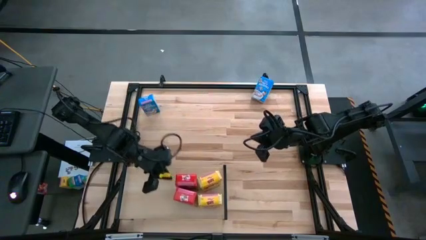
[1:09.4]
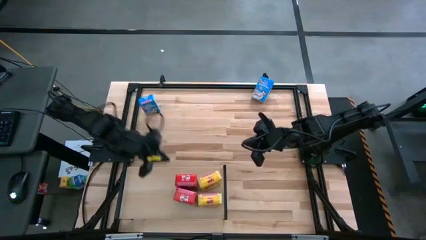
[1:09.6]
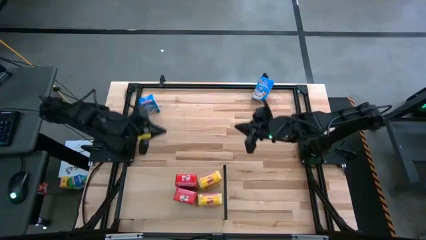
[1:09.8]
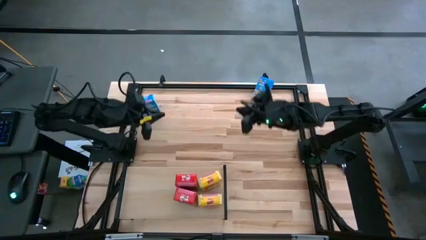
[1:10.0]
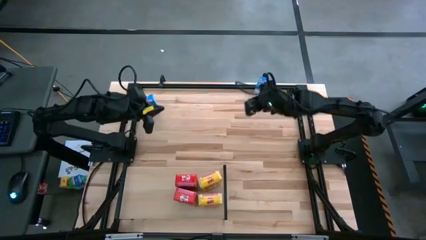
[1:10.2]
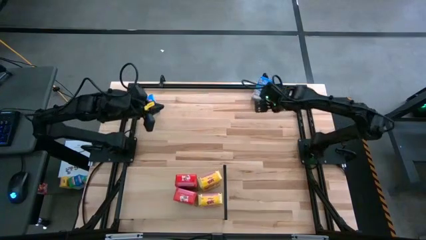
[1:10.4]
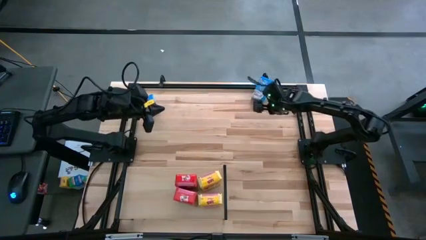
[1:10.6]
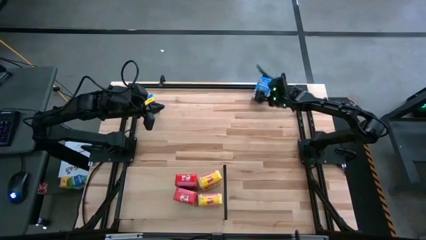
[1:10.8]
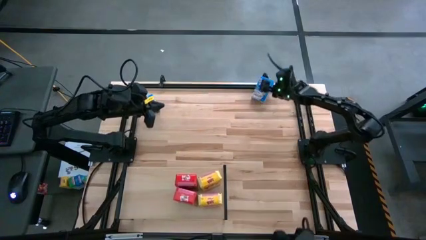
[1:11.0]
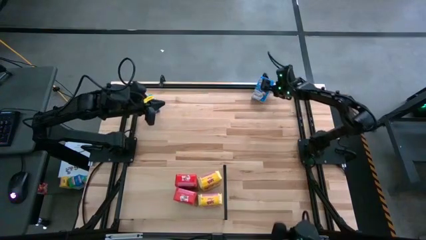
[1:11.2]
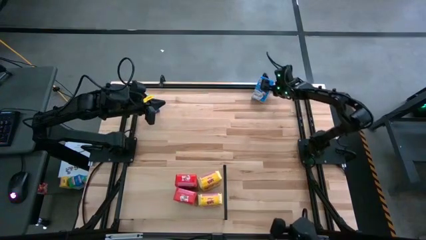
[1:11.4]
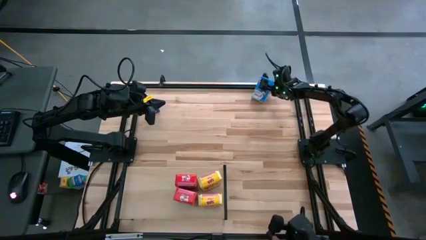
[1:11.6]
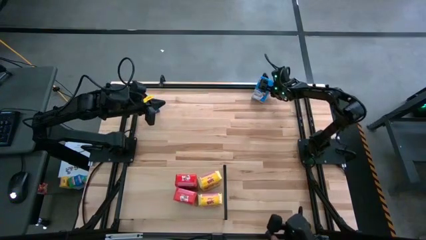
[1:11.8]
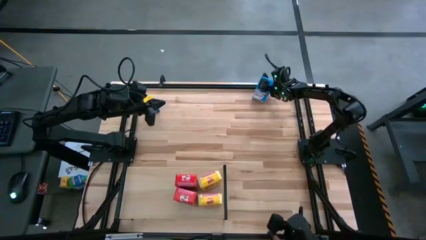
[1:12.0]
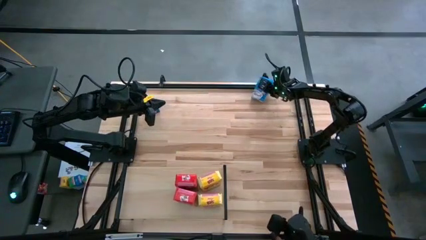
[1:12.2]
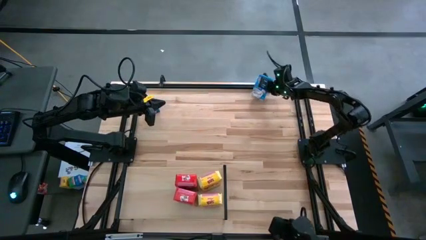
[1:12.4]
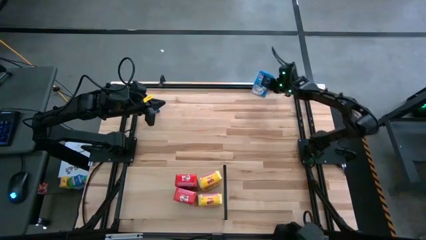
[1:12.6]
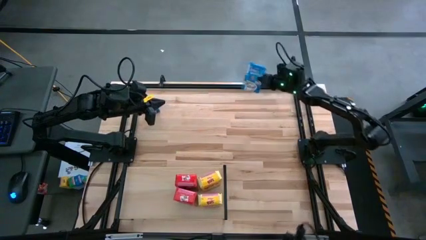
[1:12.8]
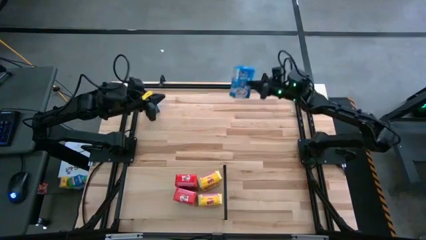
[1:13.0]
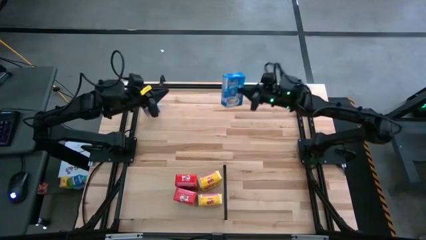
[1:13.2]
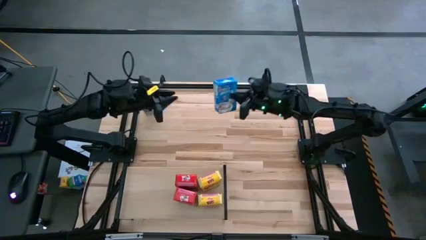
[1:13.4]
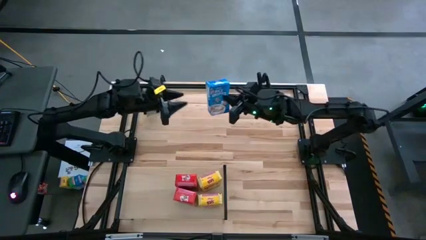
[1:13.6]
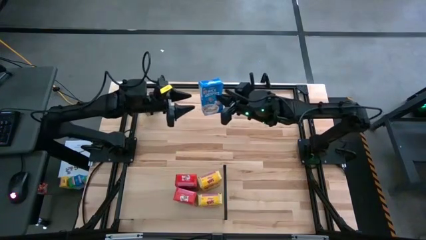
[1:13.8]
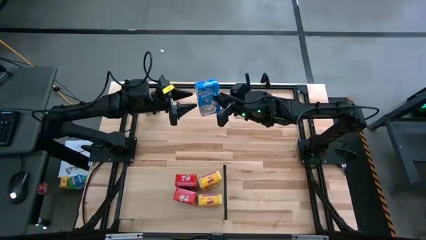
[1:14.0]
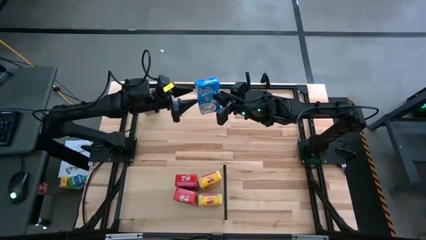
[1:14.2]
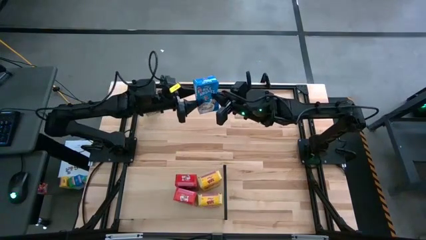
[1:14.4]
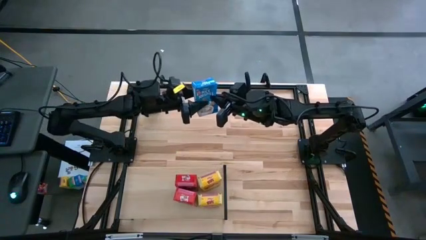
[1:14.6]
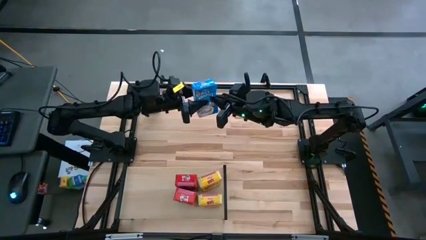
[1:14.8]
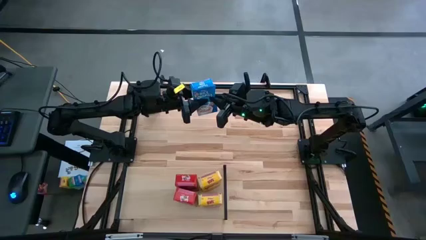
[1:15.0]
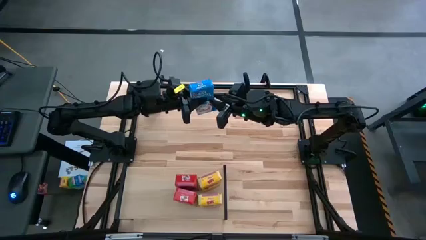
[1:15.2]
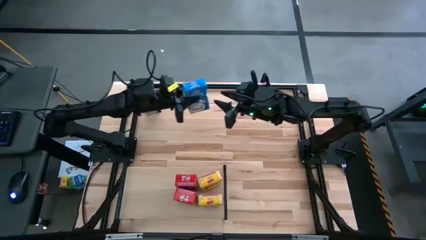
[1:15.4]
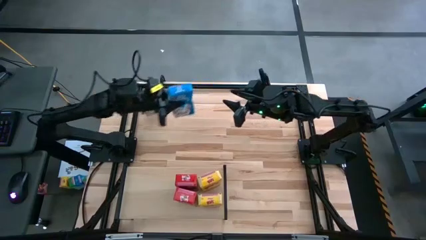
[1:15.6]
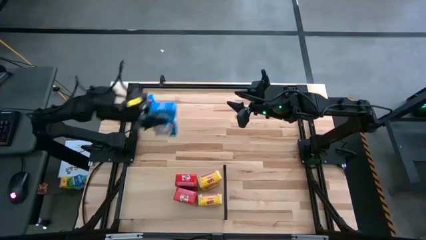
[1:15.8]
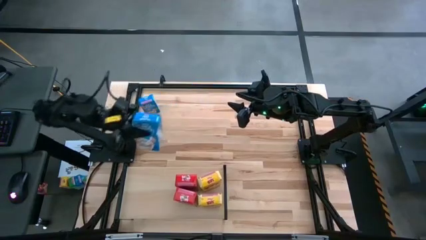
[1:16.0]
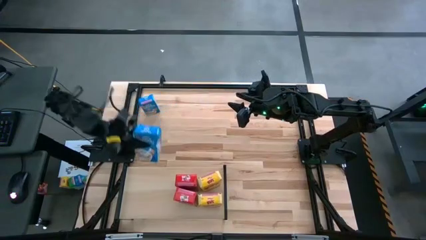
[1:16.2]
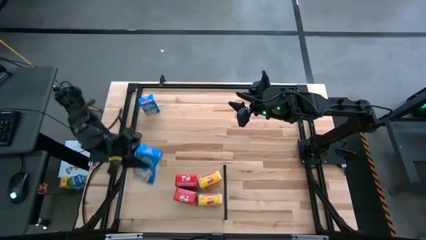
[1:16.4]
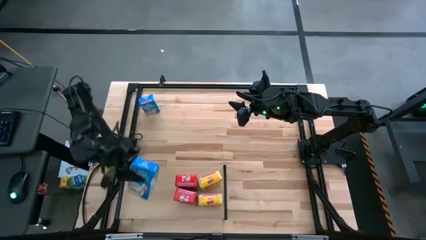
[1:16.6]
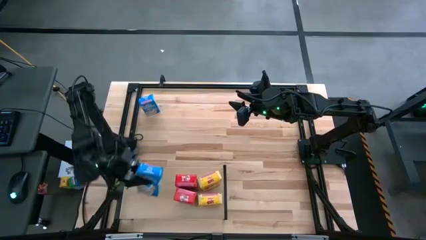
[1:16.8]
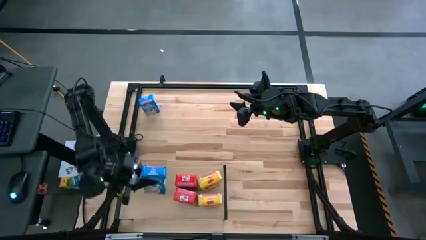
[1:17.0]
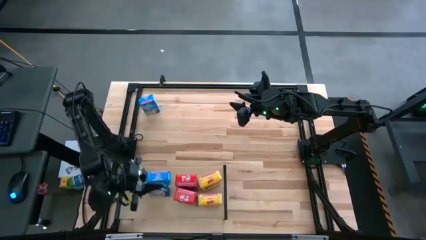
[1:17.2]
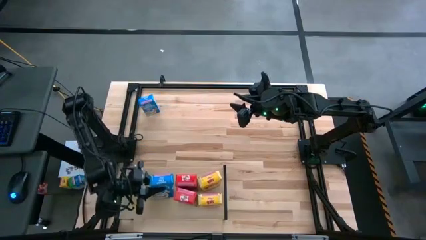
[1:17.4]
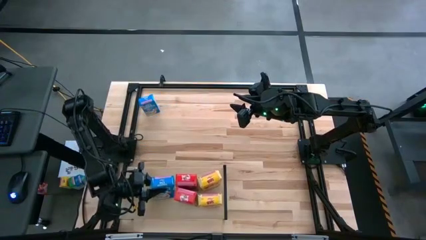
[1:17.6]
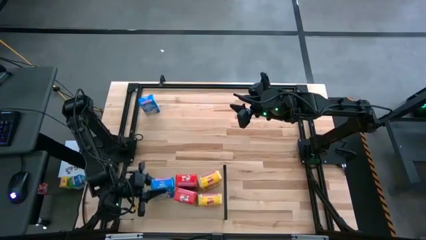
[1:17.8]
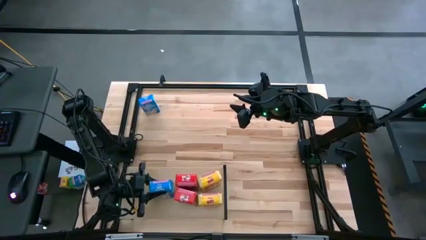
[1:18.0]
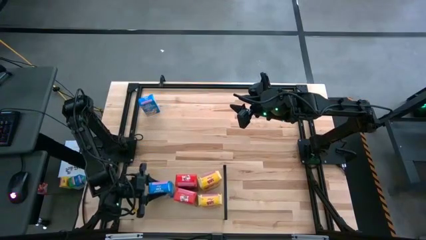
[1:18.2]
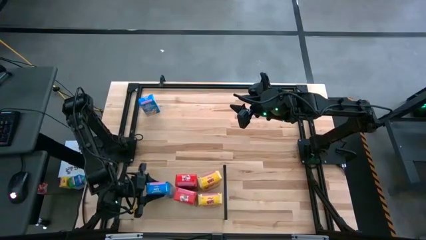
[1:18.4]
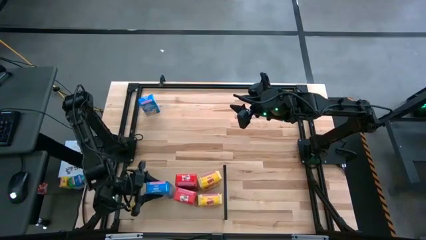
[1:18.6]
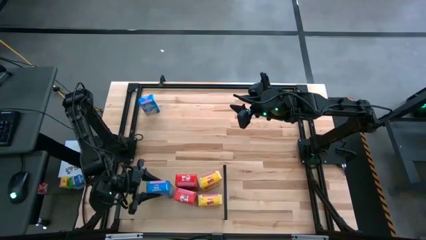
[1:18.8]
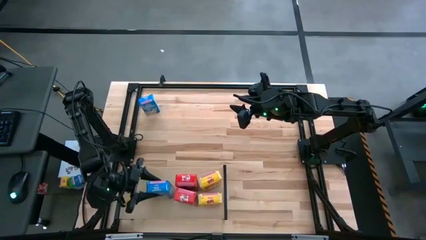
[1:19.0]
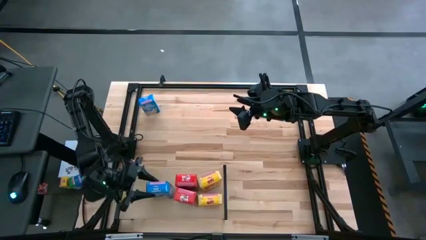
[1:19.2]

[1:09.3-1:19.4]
Task: Stack cereal on shelf
Put the right blue cereal box on the shelf

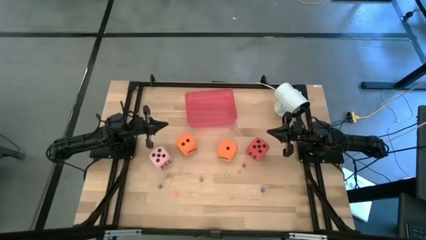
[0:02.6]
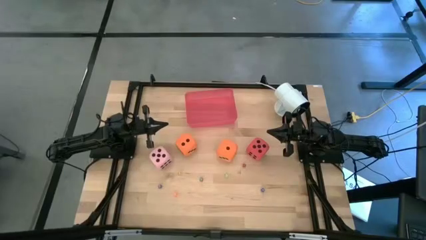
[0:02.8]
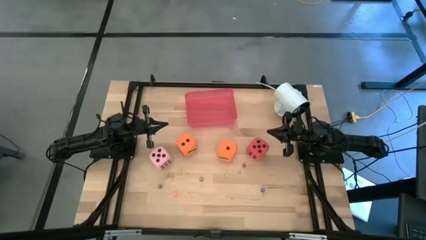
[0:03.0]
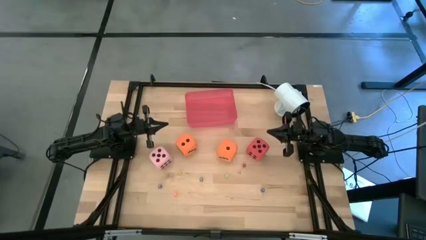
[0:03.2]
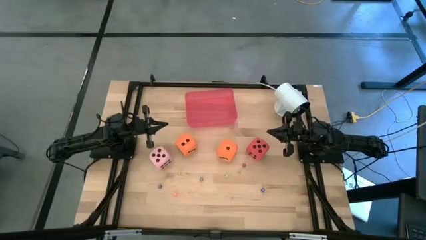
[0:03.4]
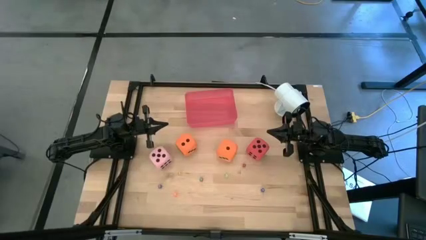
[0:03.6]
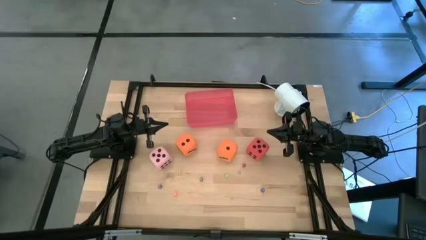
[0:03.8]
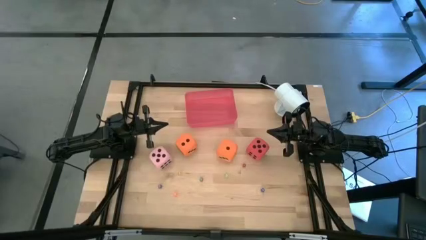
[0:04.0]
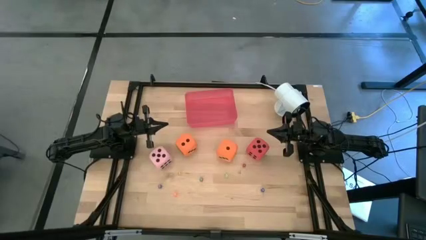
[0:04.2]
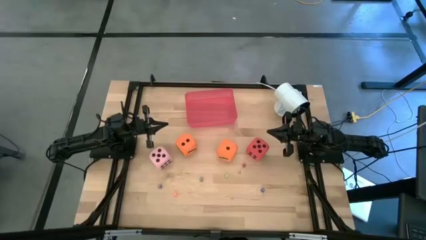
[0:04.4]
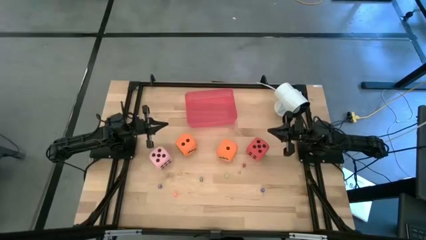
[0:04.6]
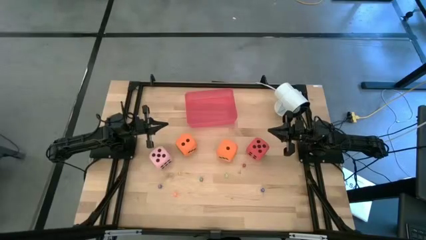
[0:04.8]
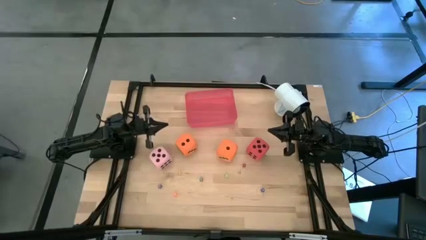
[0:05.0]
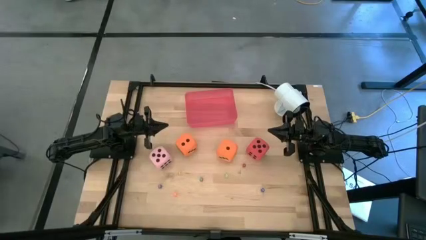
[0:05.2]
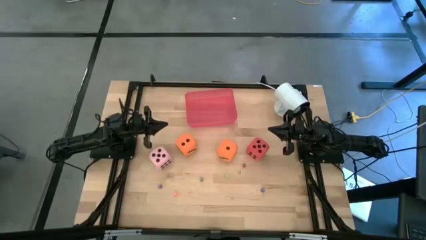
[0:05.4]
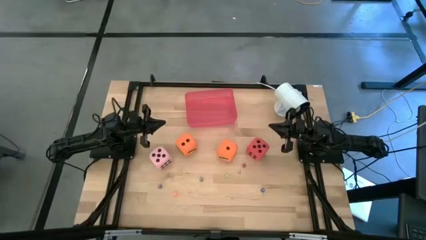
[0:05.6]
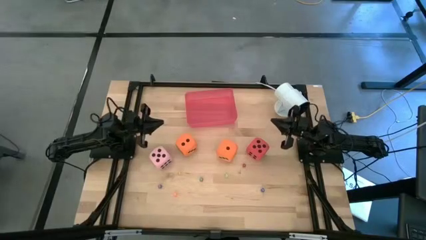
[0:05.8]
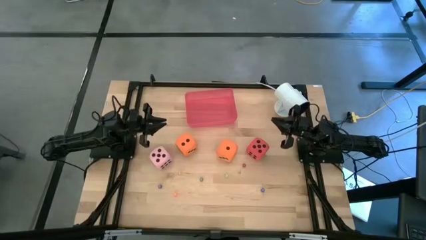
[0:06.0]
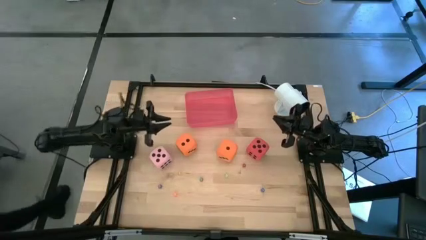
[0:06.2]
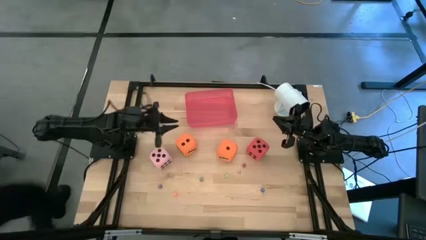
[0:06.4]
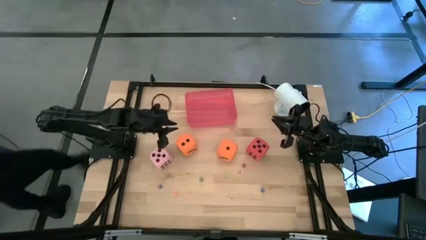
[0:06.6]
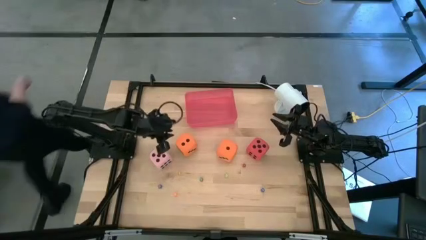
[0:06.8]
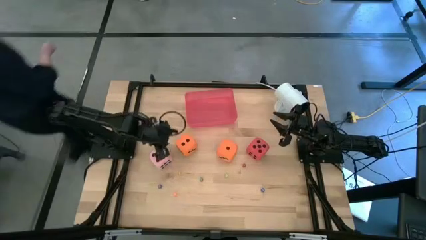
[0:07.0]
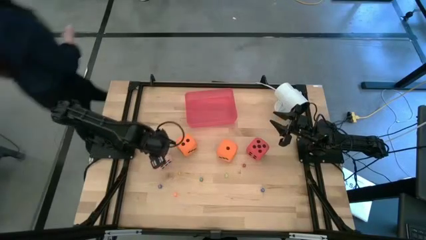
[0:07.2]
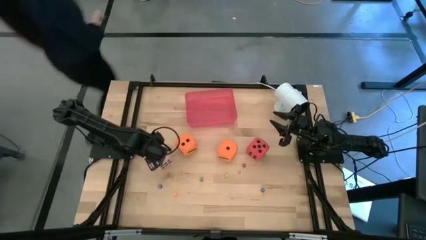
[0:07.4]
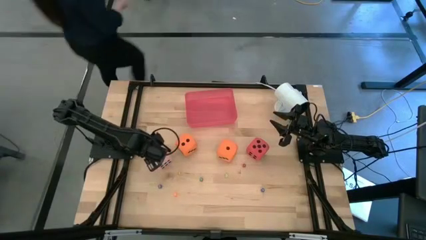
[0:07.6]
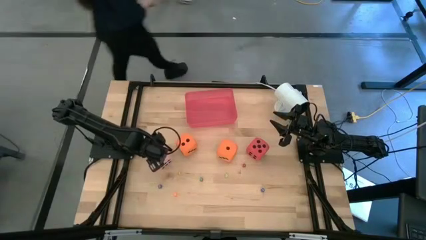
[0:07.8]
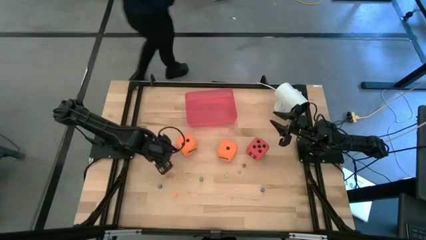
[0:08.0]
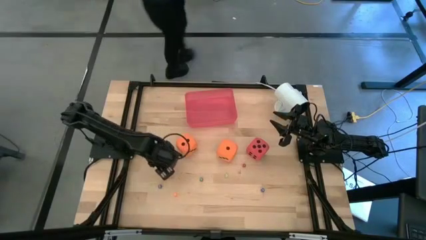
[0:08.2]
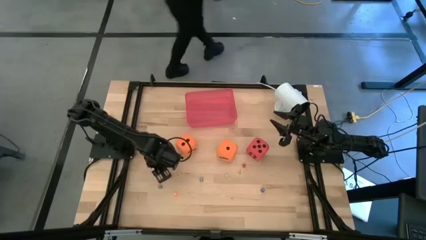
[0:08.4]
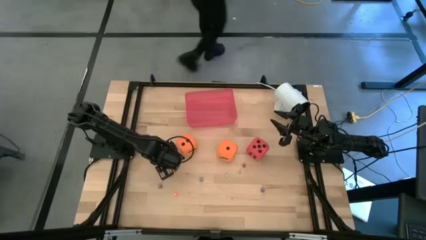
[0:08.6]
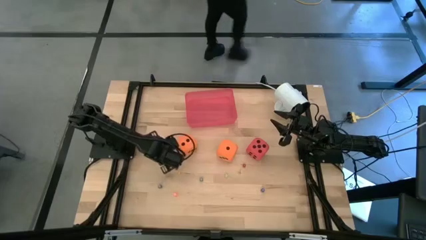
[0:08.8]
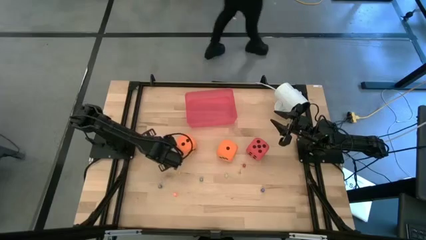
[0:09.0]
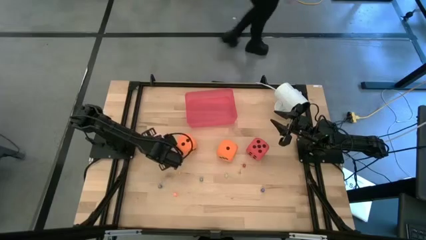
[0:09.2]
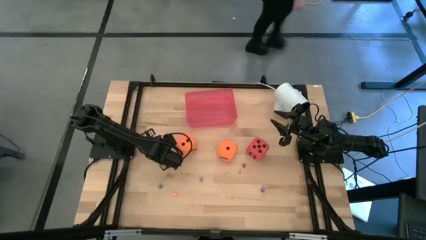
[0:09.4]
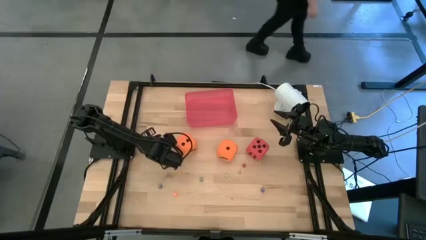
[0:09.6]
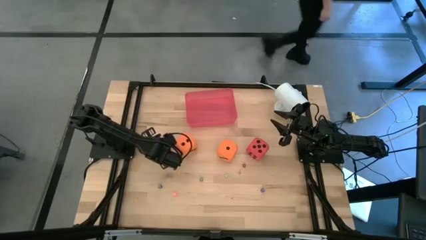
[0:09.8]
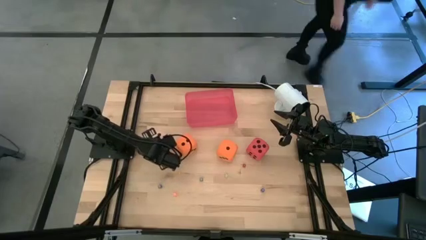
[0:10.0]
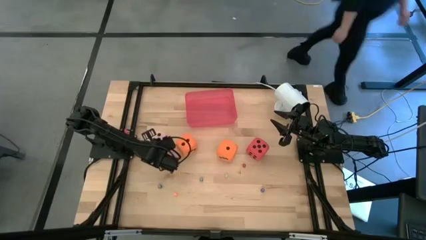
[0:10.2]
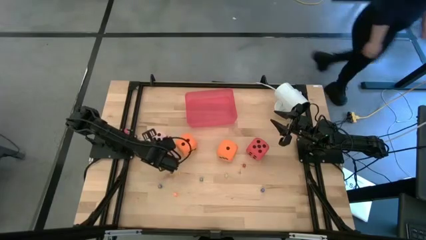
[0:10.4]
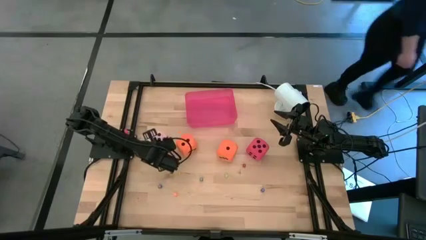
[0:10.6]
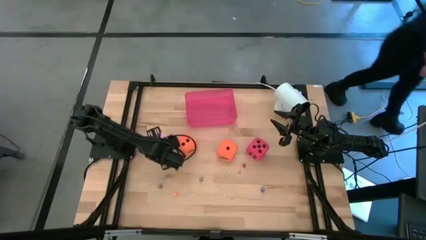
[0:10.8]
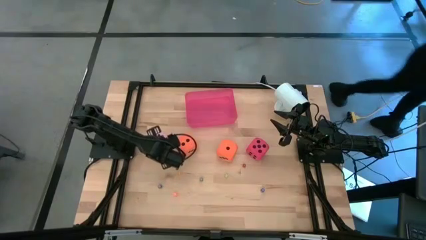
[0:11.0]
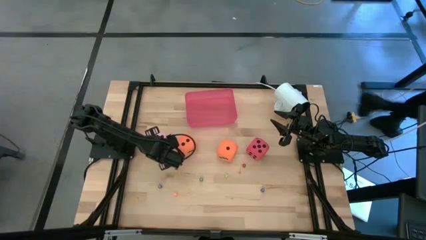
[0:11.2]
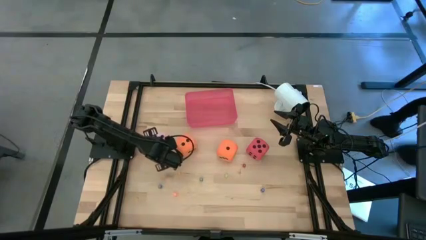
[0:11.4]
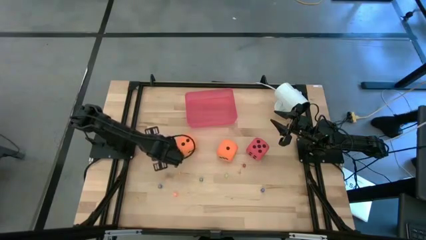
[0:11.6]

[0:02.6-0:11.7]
Task: Pick & Place Dice
Put the left large pink die into the red bin
